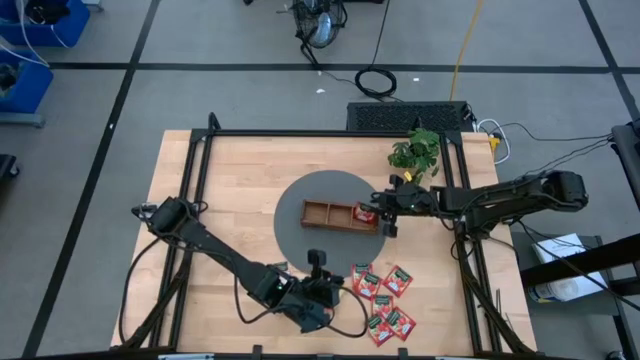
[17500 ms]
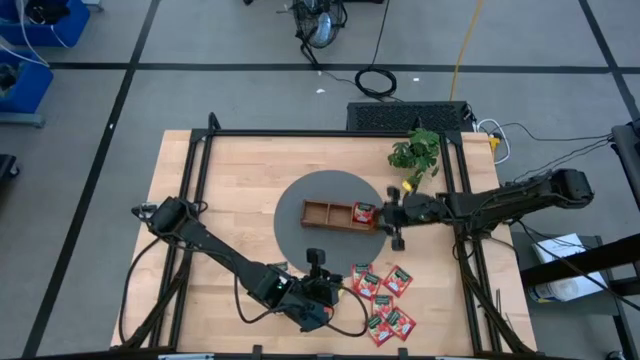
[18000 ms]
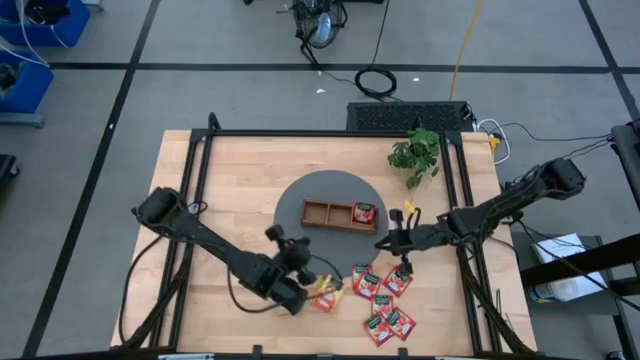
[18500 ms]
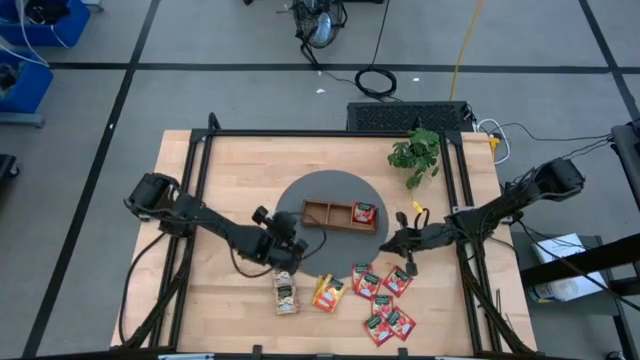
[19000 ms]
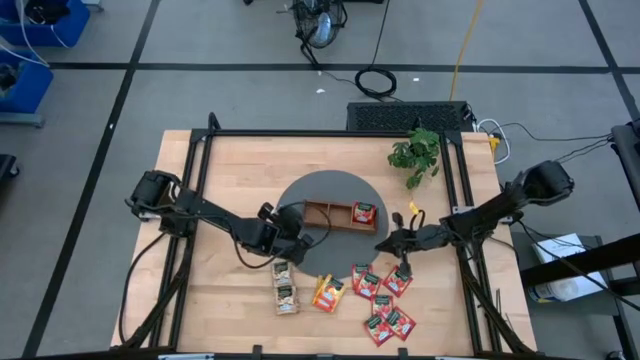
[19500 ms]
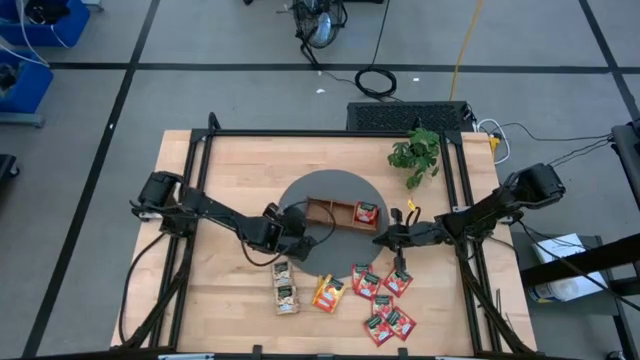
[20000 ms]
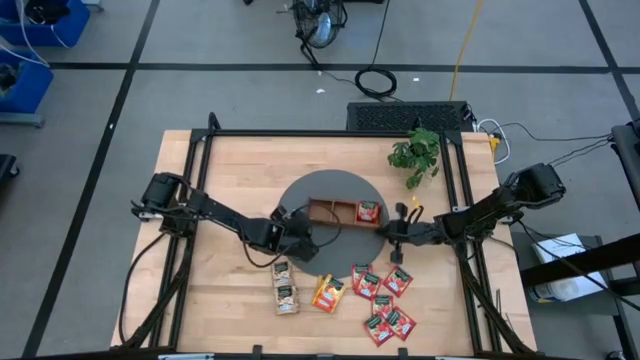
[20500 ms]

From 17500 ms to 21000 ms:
Task: Pick & Place Tea
Adjust the wooden organizer

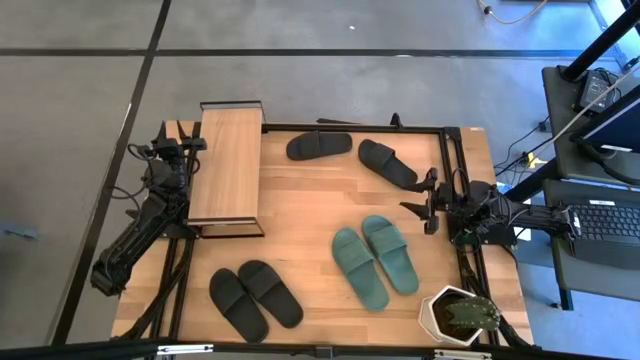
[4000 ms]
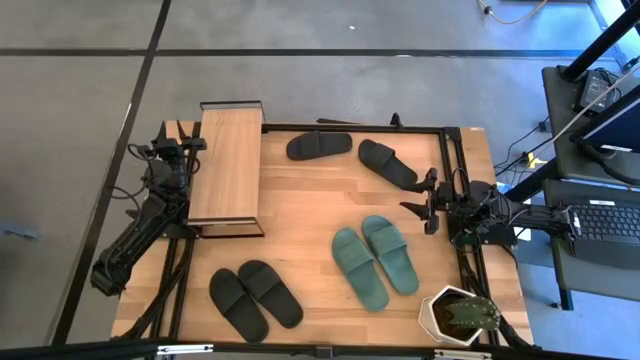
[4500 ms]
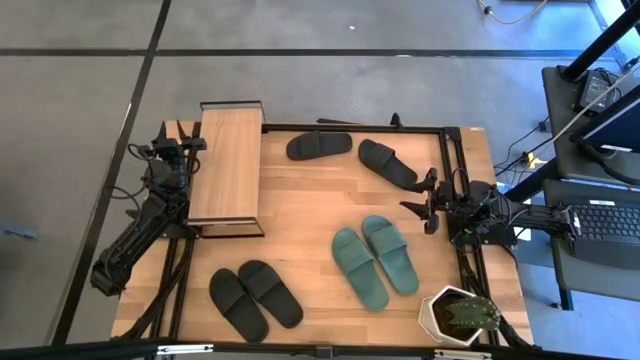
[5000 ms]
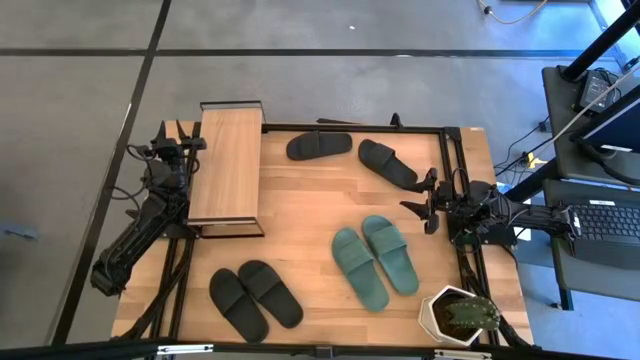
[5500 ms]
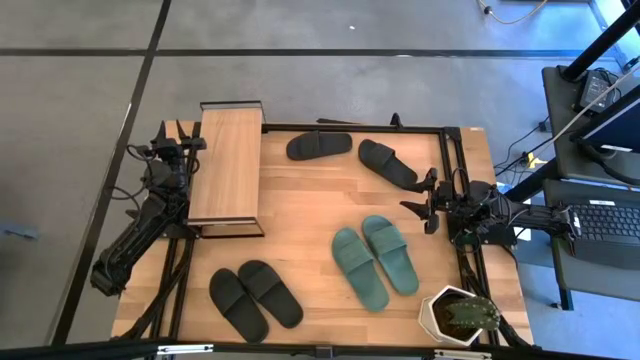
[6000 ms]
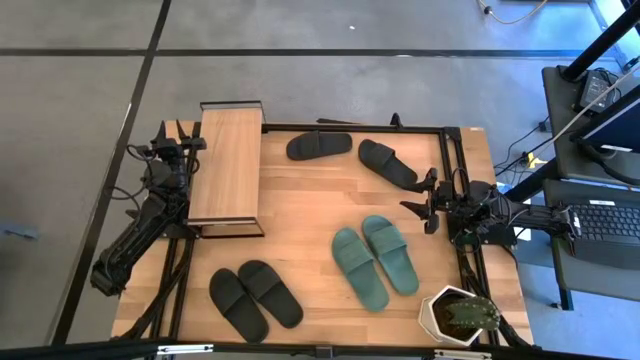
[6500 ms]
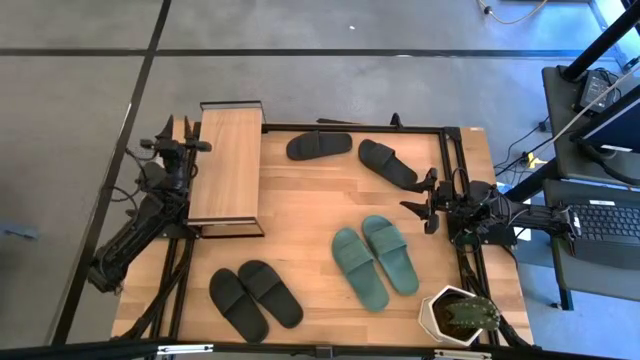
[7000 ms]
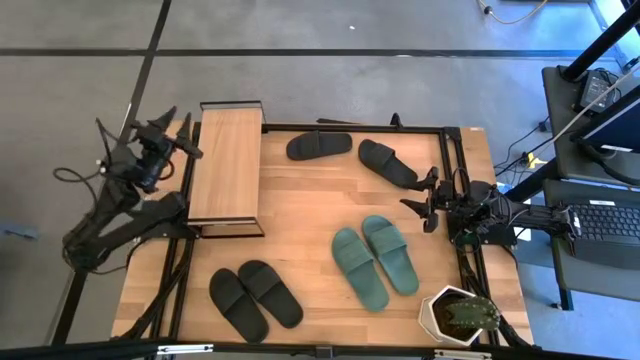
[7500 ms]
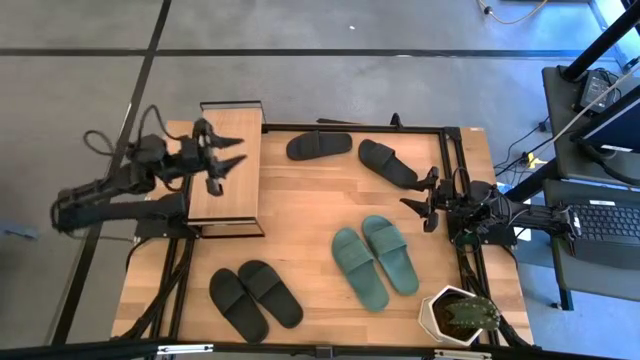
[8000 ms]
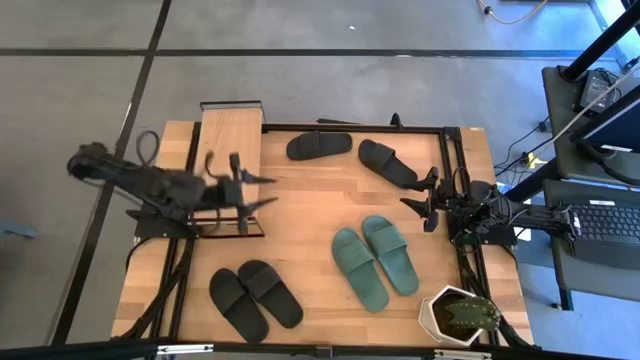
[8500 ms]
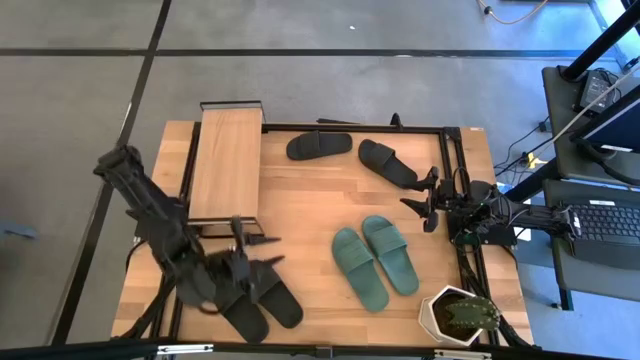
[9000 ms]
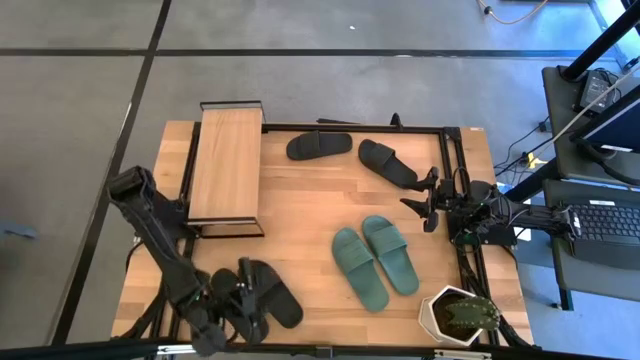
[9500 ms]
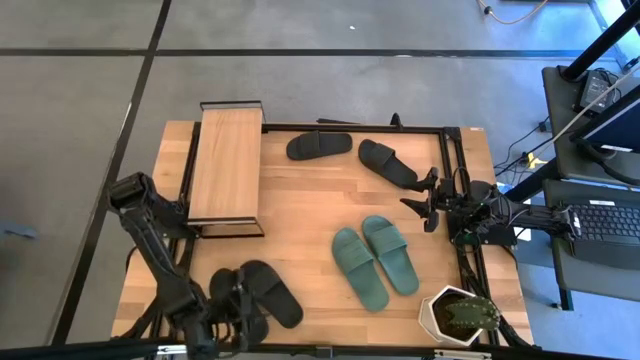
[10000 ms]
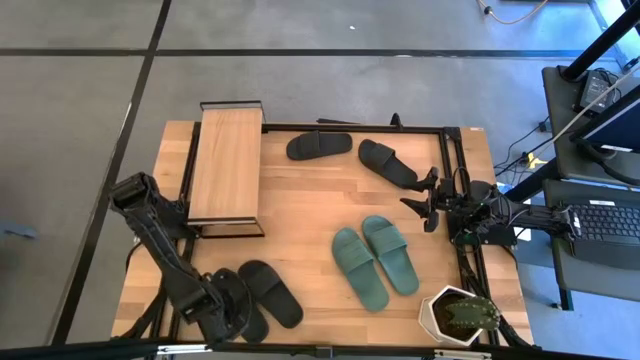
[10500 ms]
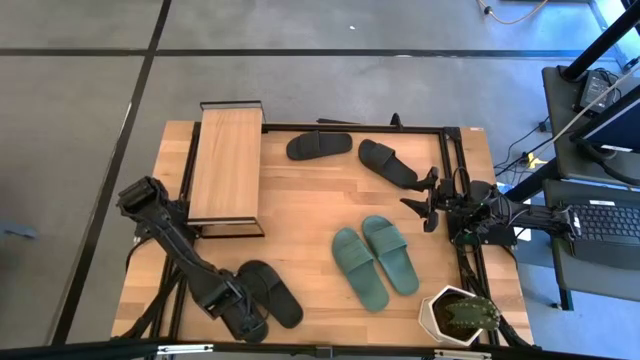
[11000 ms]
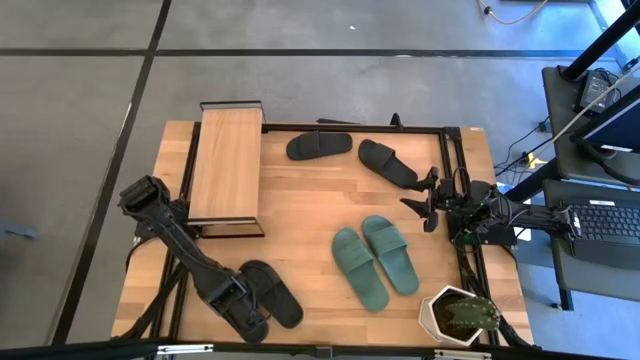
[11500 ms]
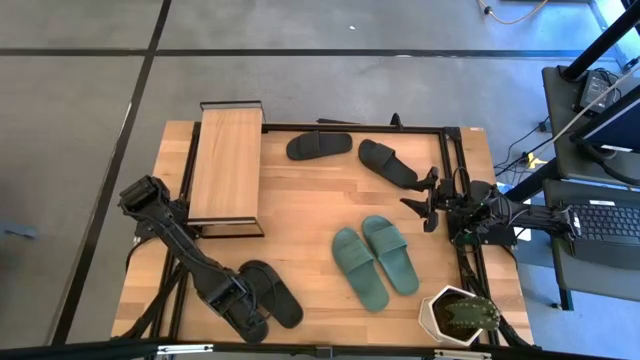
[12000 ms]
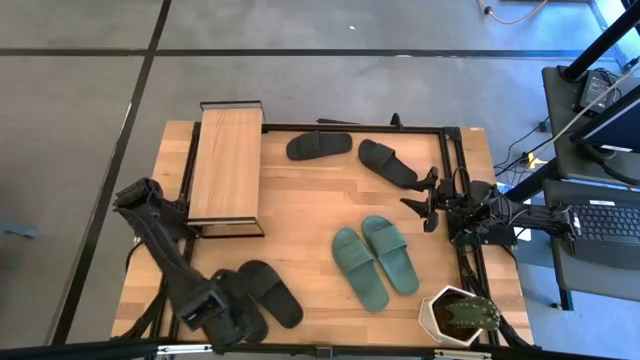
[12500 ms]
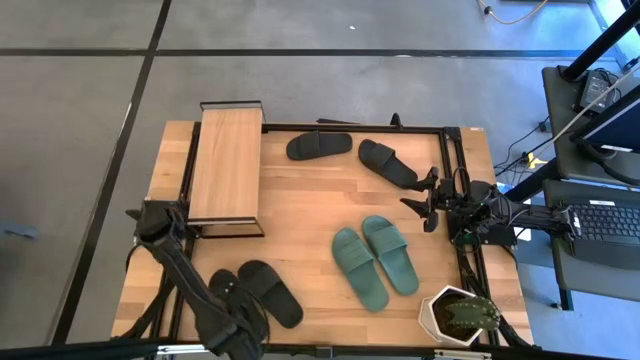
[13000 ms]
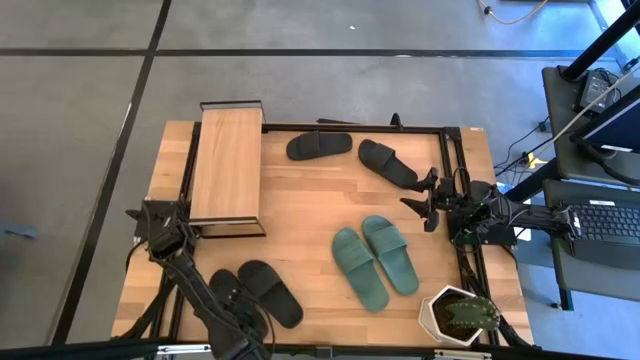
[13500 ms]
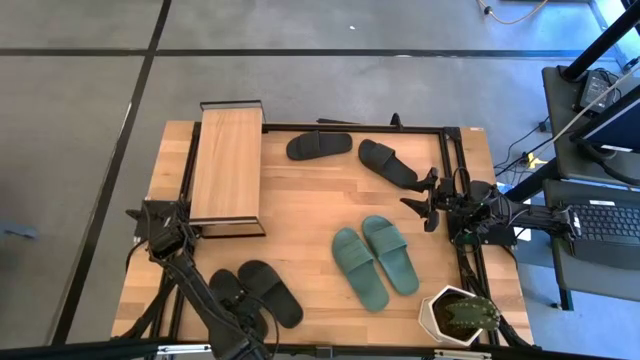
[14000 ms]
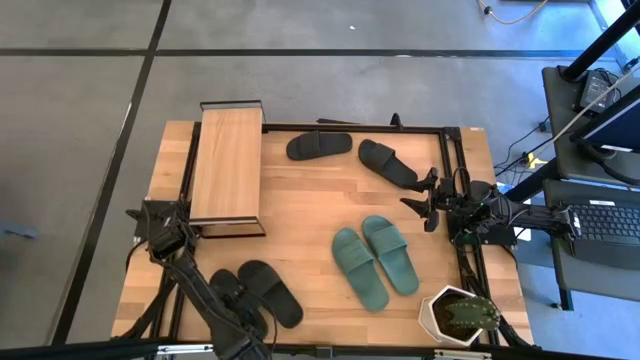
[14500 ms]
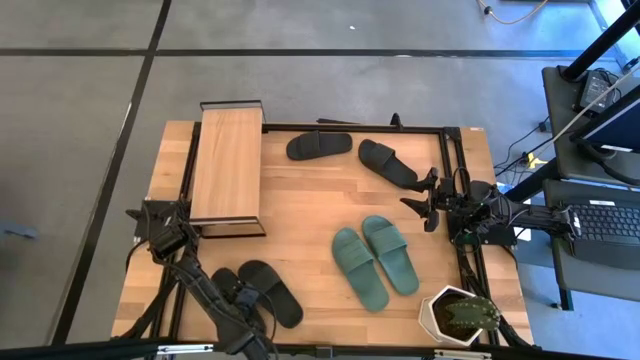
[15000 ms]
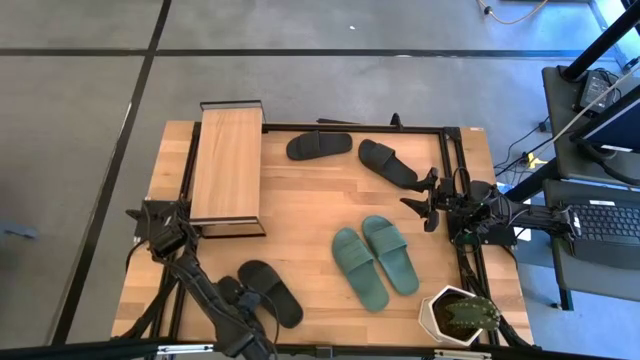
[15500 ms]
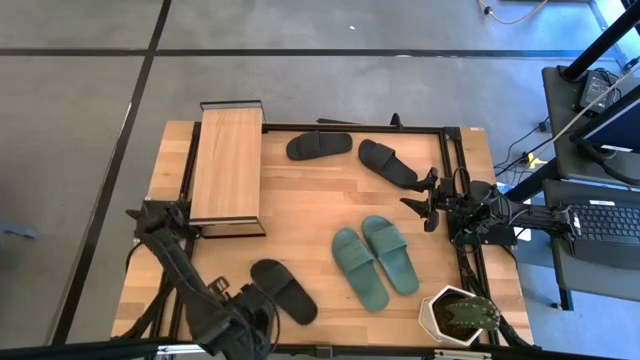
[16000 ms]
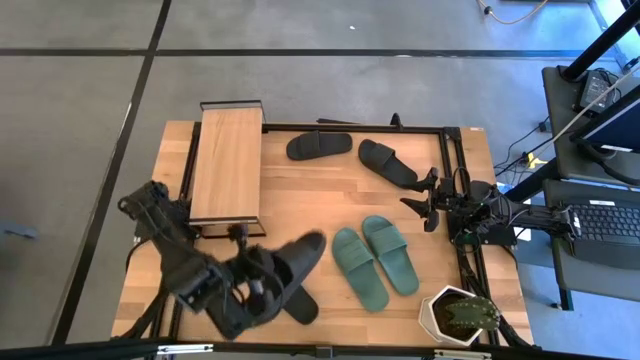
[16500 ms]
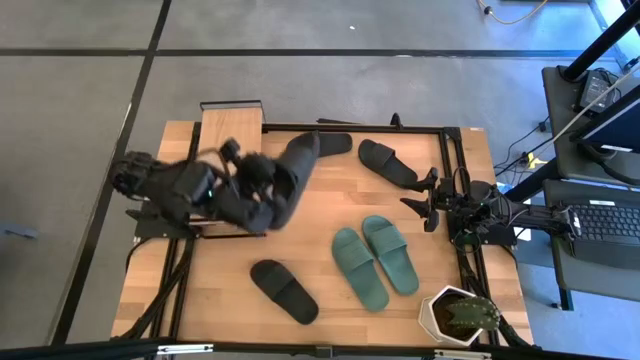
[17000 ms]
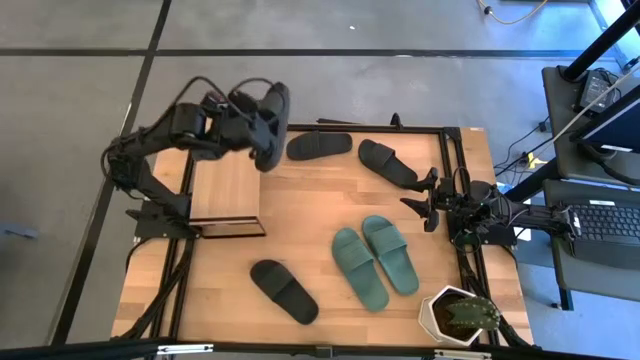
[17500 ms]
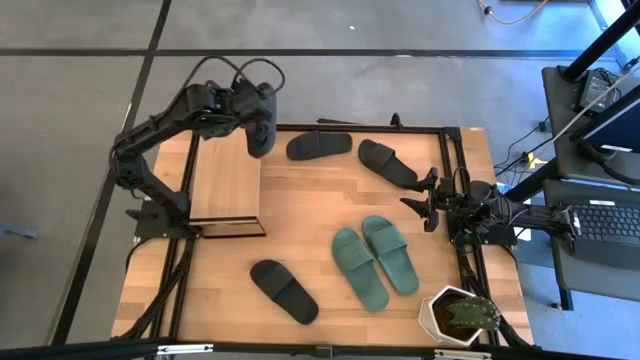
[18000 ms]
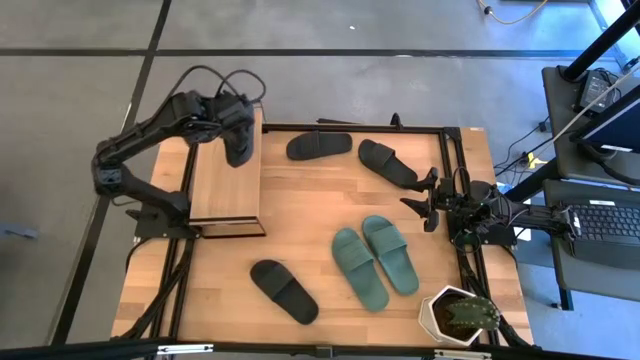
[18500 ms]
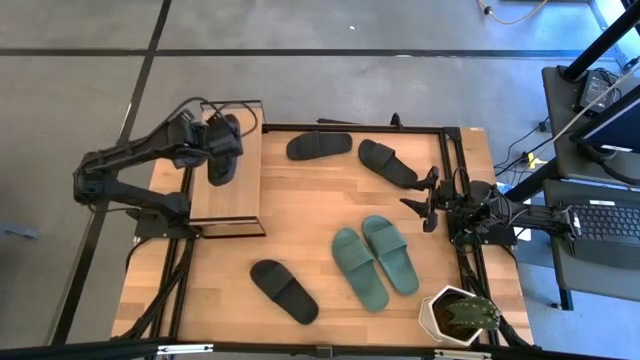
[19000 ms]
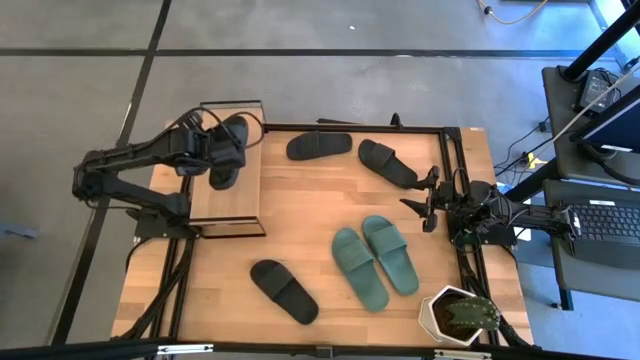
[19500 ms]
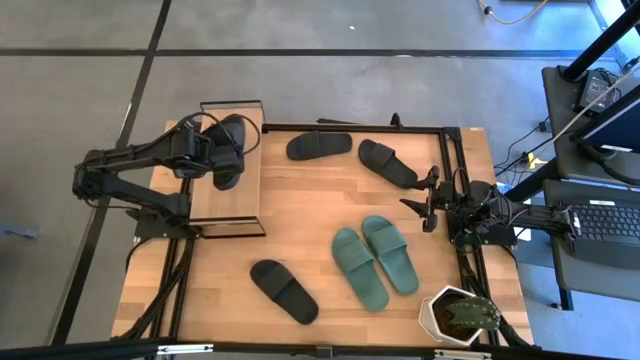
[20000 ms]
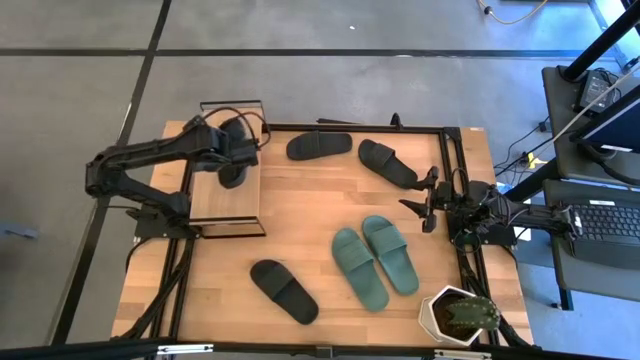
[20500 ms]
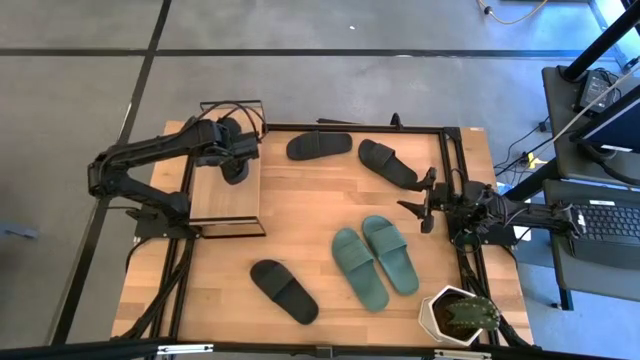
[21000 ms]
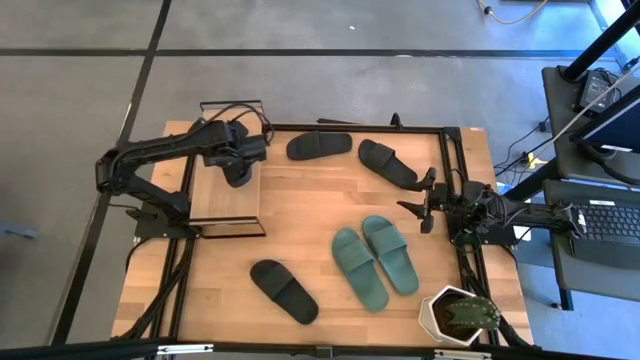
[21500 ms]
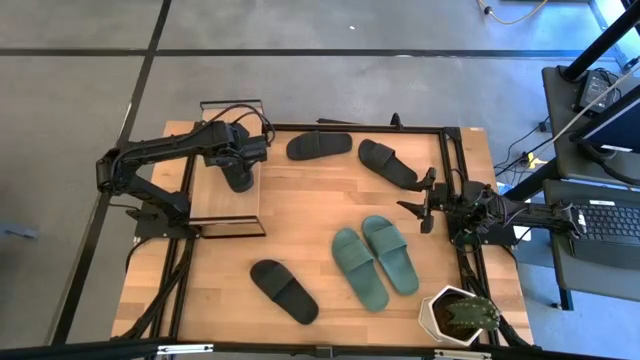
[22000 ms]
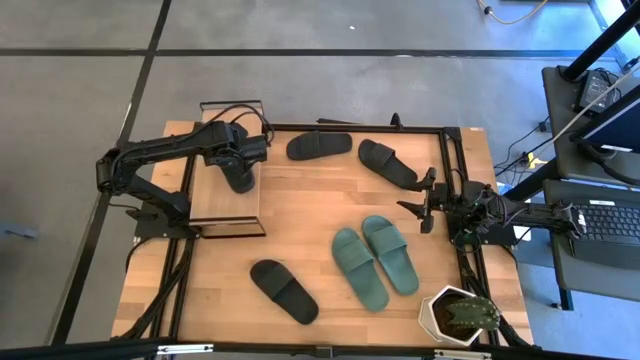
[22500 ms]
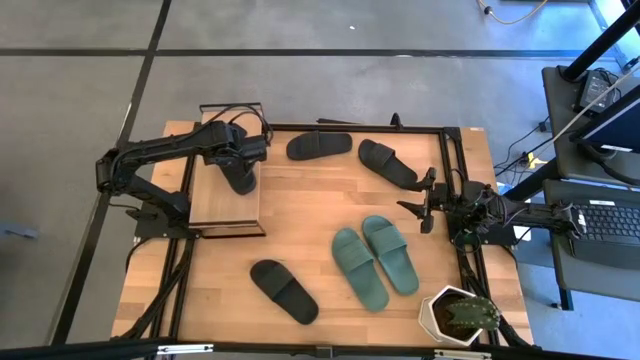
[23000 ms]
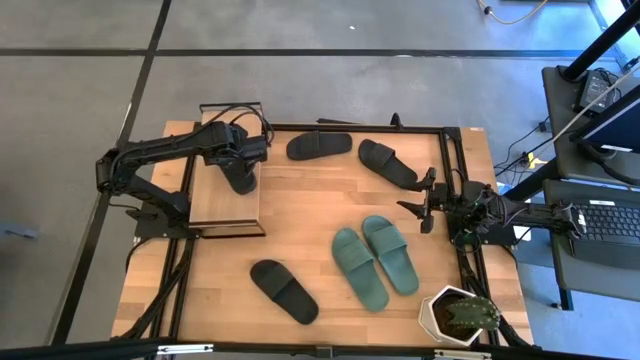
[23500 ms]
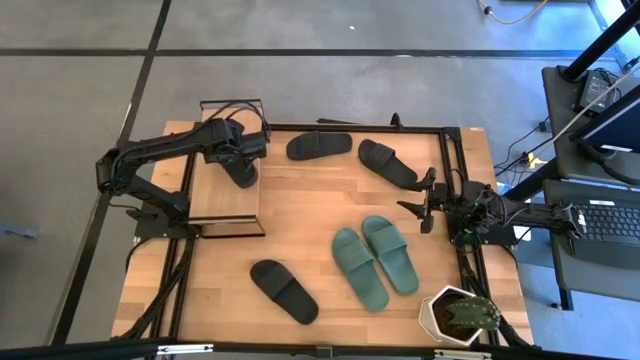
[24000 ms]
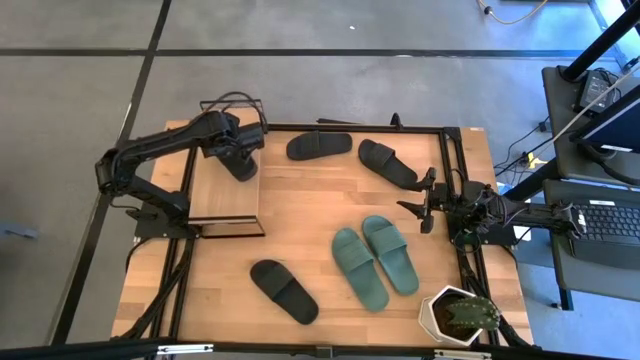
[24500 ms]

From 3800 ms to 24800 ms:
Task: Pick and place slides into the shelf
Put the black slipper on the shelf
